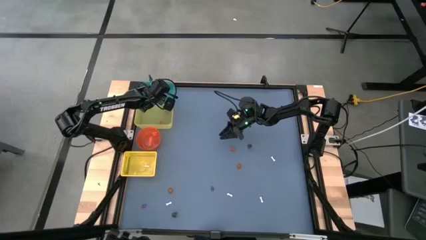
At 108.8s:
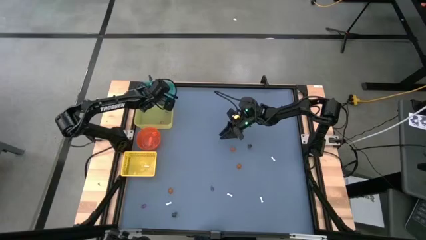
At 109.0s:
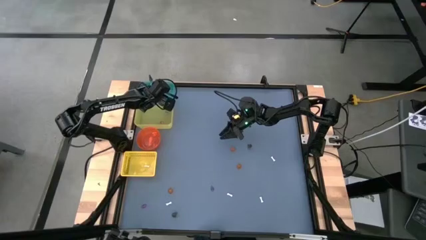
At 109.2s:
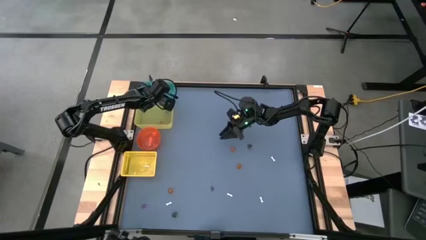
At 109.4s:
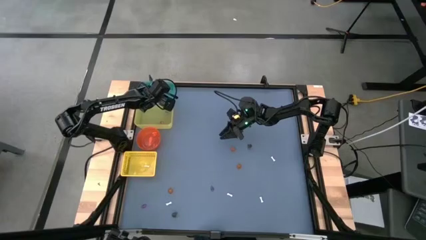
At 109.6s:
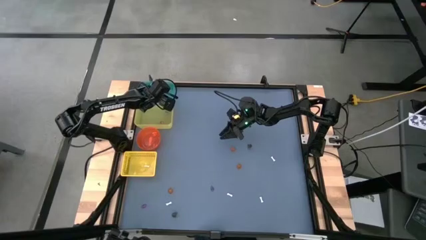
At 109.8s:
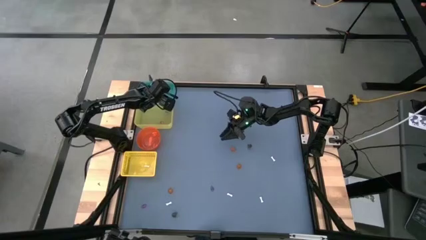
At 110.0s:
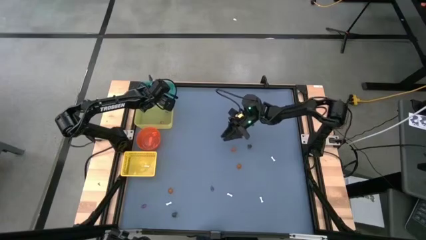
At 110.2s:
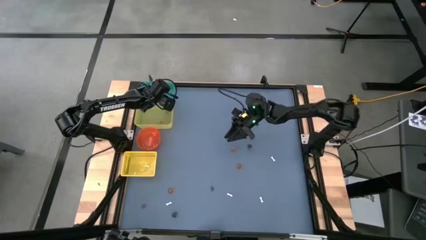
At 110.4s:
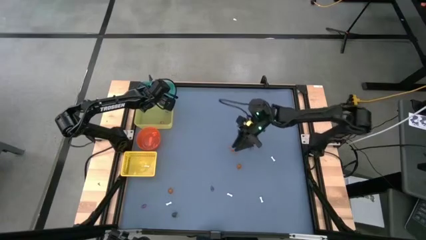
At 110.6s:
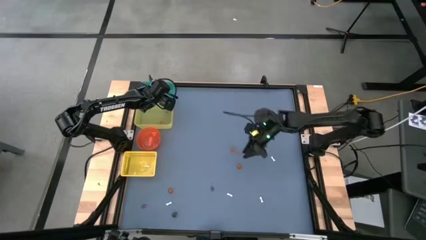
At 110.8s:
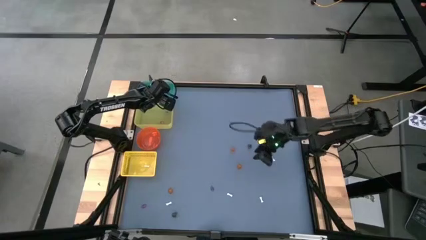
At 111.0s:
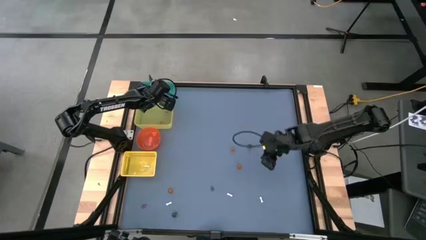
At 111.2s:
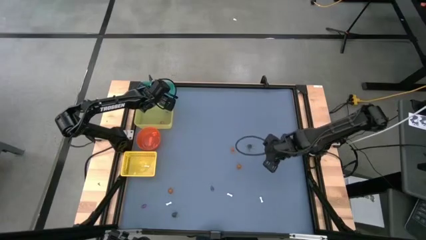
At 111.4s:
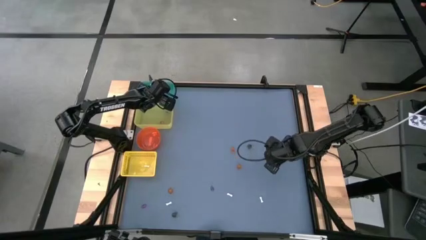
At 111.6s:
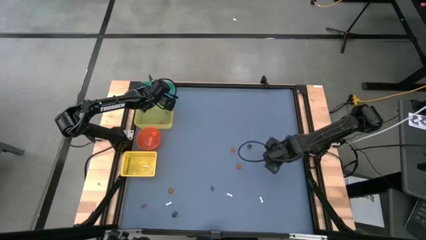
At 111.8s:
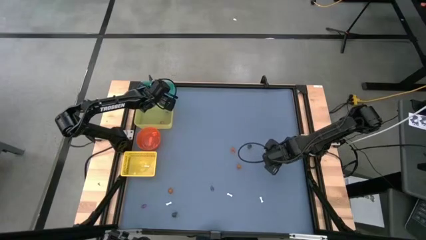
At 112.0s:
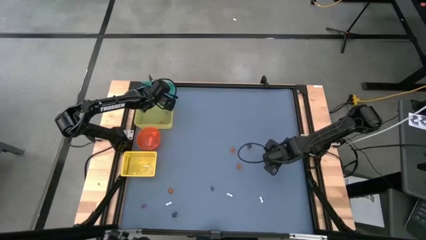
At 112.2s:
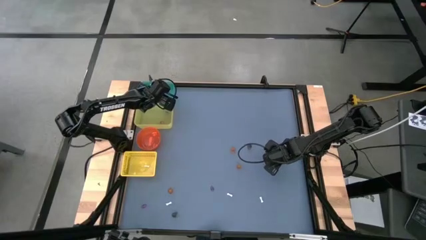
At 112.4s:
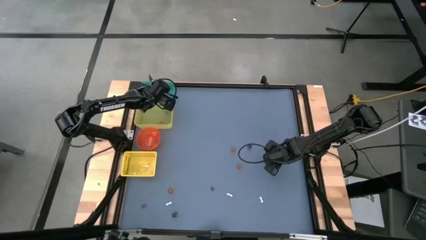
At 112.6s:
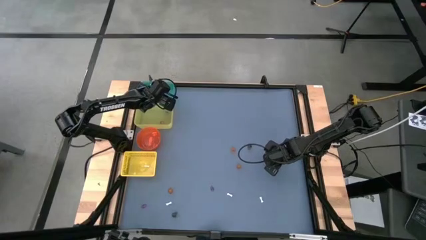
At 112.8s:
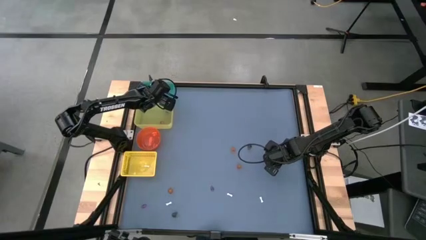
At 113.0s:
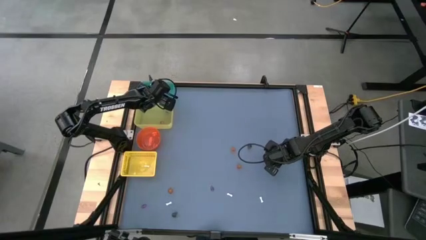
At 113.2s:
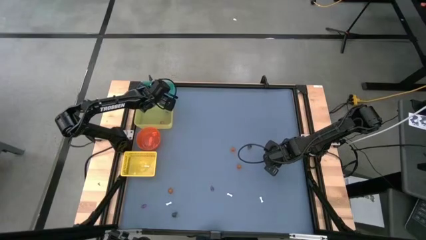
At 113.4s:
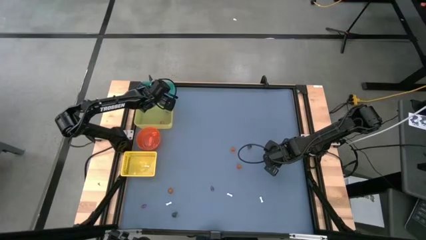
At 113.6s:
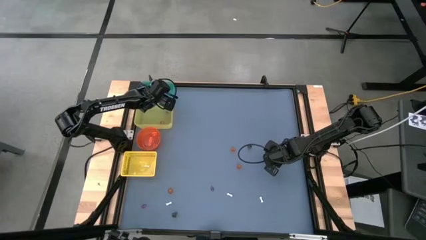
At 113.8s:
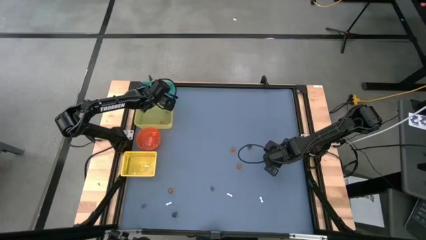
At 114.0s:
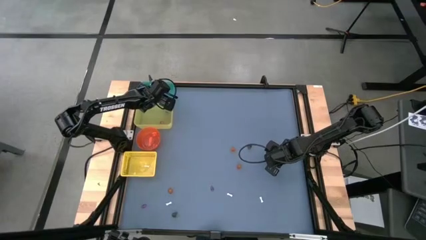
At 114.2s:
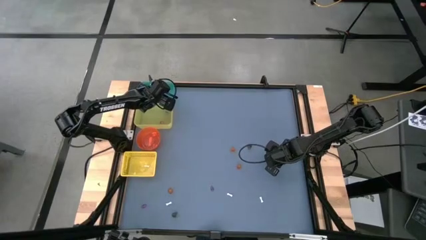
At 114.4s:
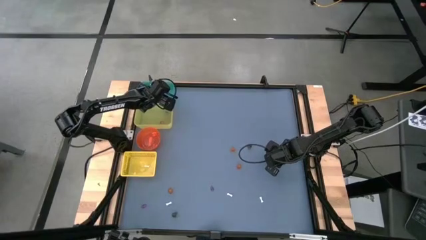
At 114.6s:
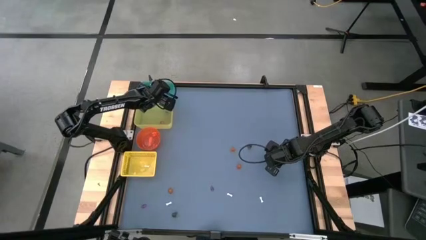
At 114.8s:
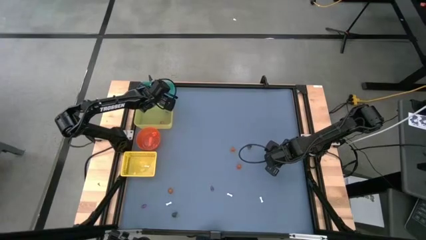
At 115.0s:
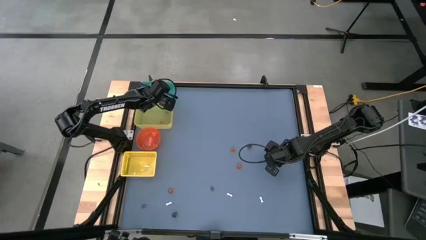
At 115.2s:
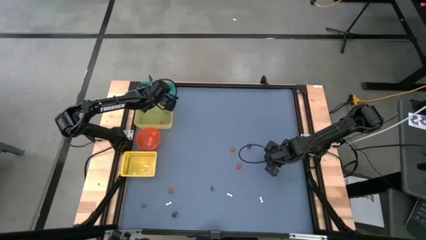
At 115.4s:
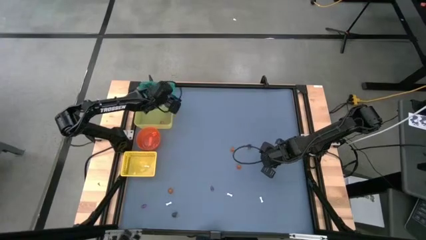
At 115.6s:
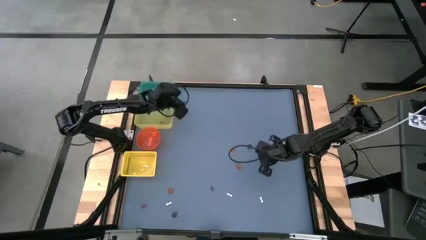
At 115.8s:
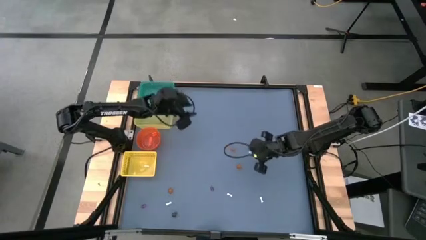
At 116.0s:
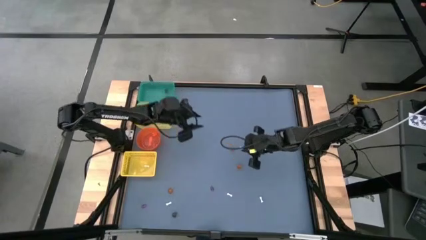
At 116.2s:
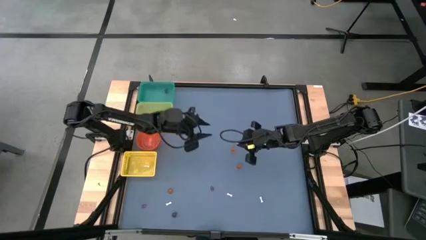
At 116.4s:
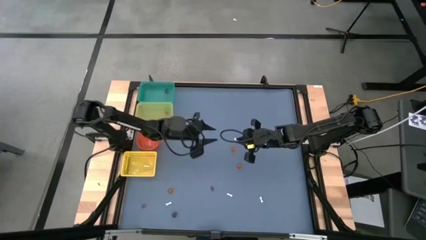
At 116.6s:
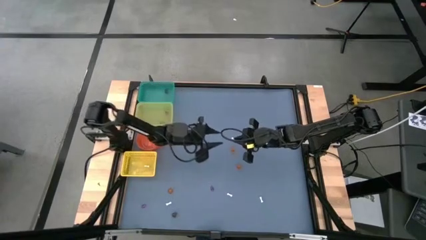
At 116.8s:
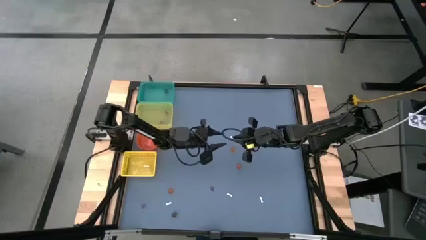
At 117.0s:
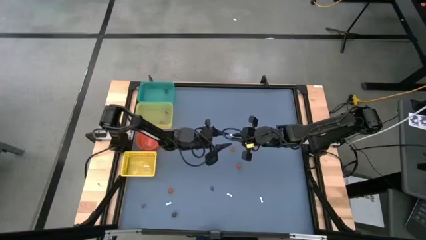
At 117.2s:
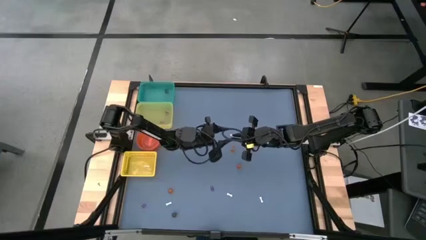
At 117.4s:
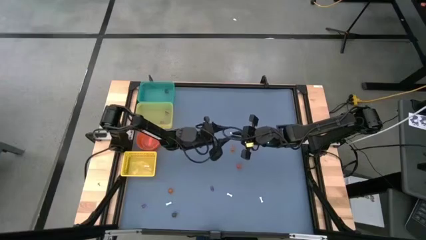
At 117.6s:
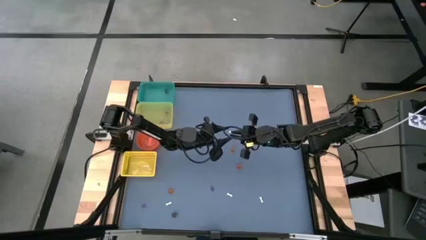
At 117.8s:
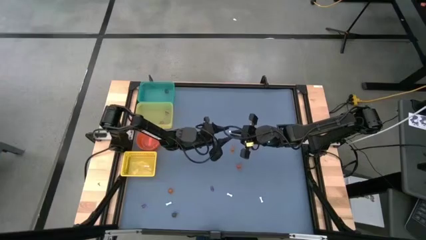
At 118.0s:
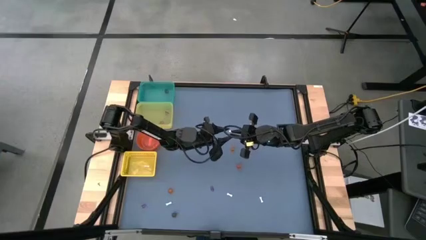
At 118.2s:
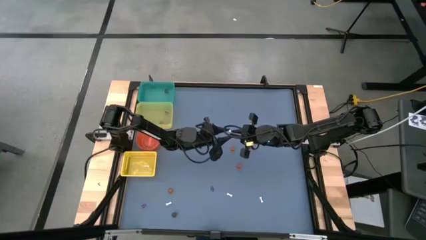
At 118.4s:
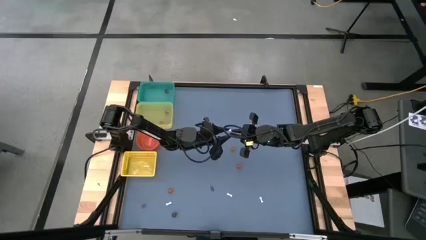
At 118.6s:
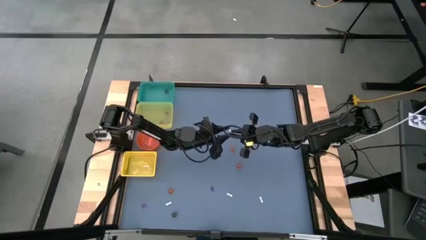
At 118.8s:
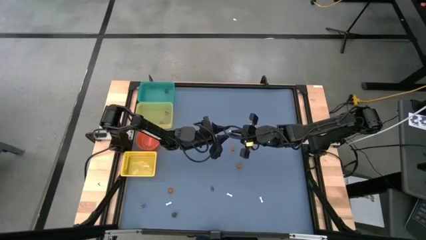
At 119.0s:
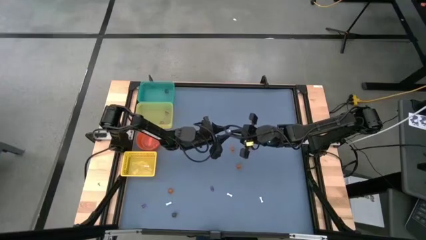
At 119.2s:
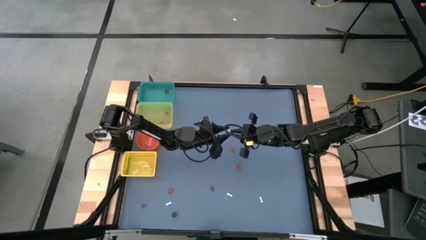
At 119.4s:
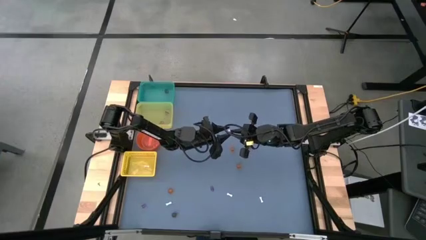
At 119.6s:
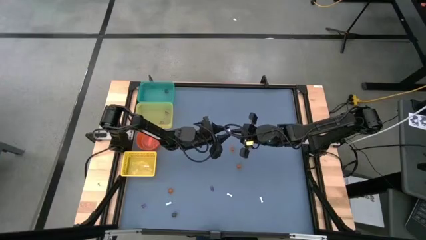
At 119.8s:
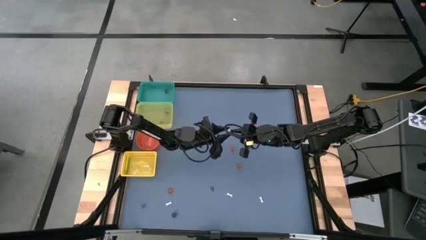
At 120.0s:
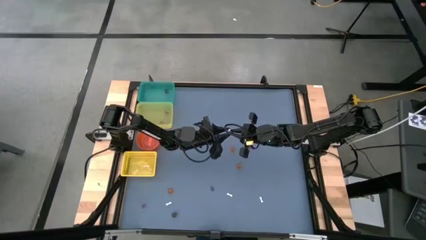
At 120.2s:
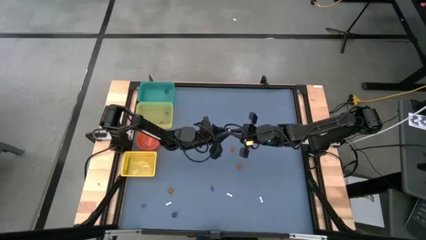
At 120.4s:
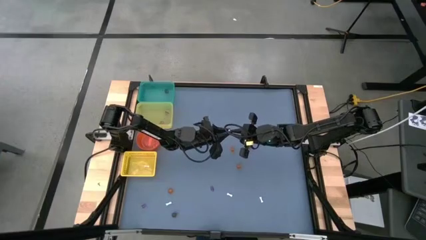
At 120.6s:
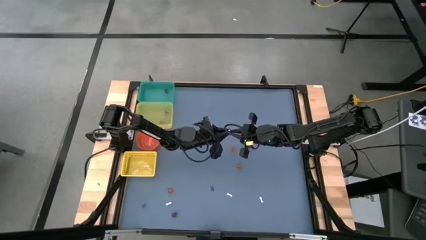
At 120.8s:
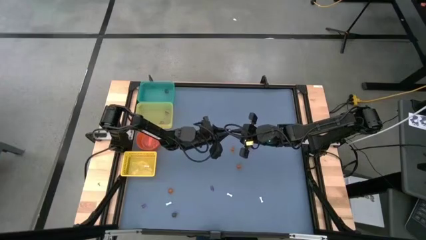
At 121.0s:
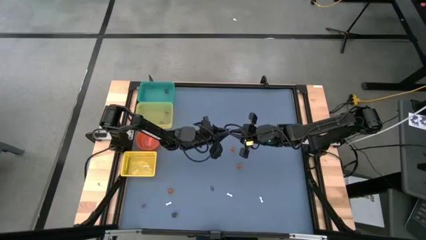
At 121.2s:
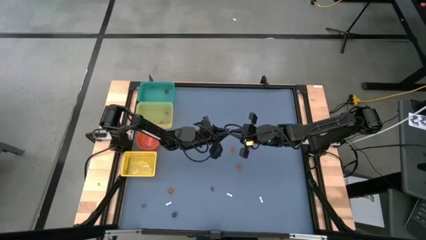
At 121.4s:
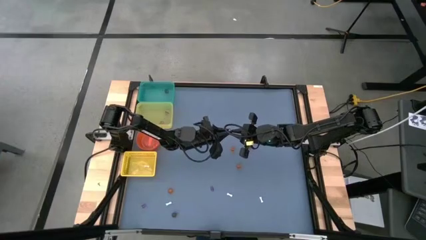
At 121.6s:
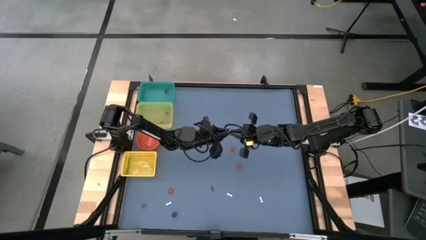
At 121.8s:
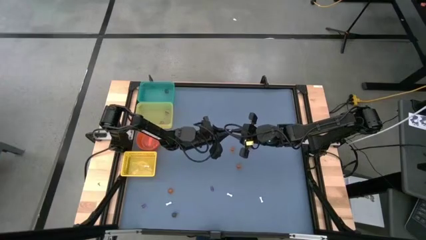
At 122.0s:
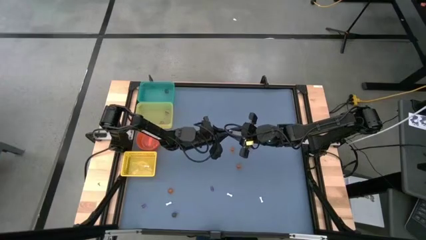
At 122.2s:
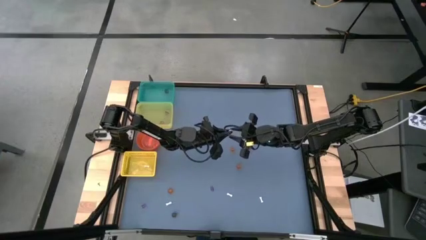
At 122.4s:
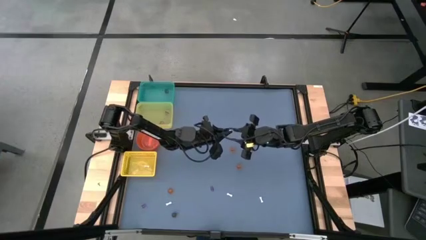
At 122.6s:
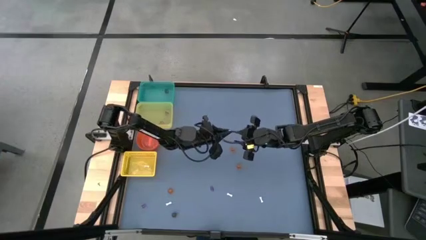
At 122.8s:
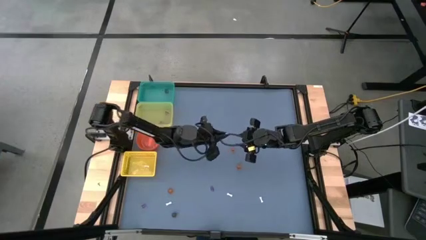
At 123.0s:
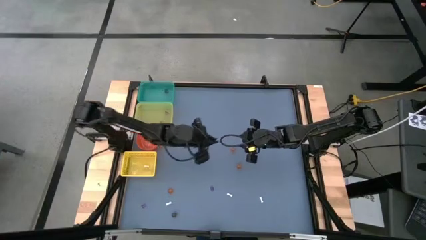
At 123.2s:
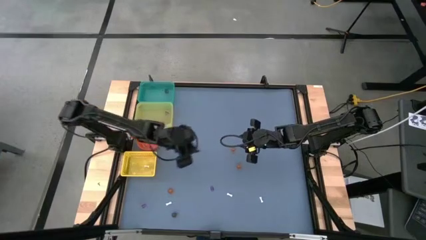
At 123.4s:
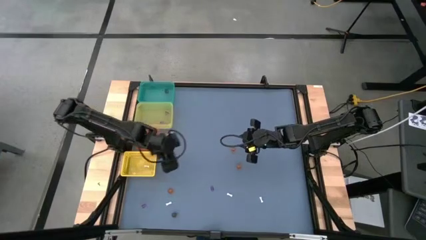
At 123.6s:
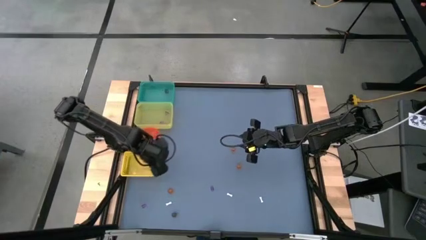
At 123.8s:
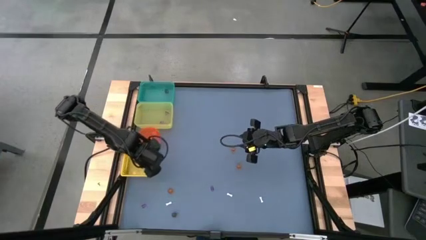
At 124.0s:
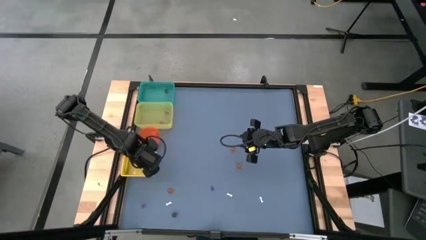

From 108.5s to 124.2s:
Task: Sort Halloween decoration
Put the top right white bone toy into the yellow basket

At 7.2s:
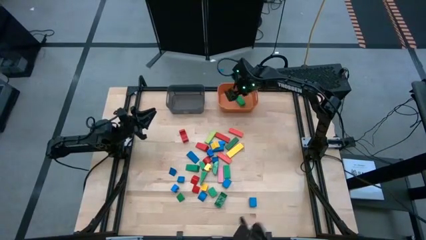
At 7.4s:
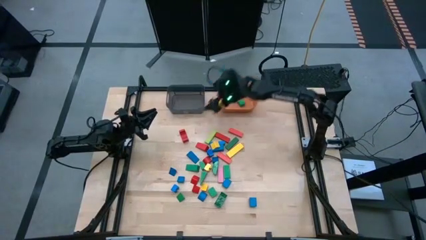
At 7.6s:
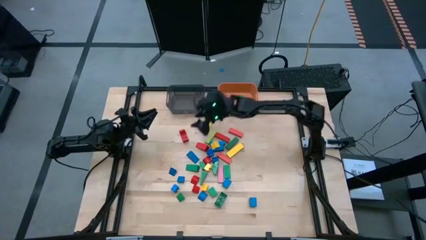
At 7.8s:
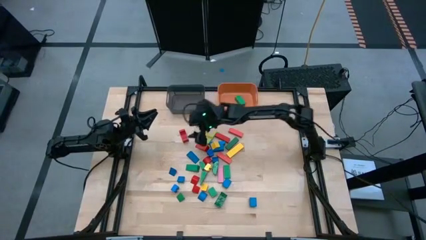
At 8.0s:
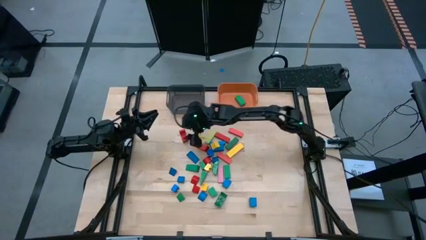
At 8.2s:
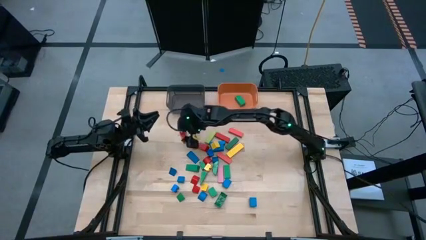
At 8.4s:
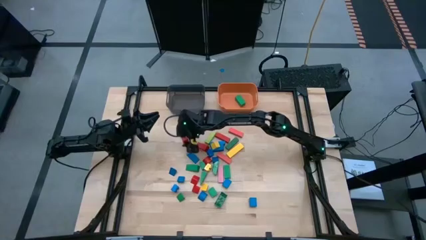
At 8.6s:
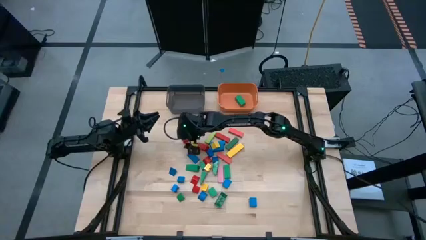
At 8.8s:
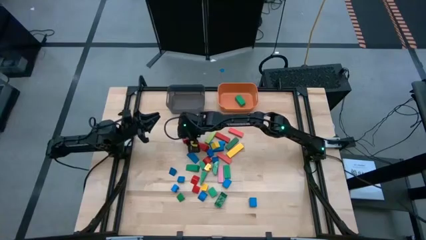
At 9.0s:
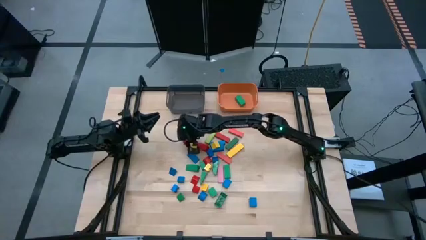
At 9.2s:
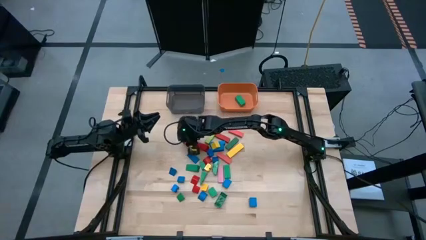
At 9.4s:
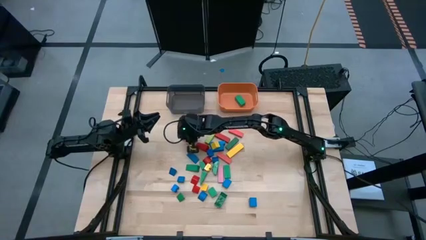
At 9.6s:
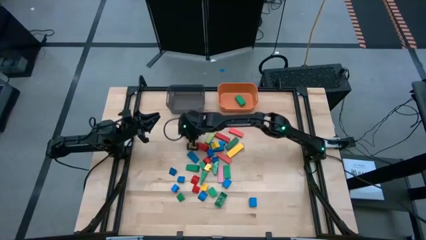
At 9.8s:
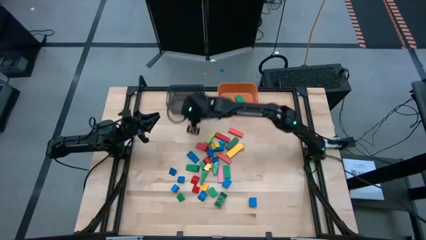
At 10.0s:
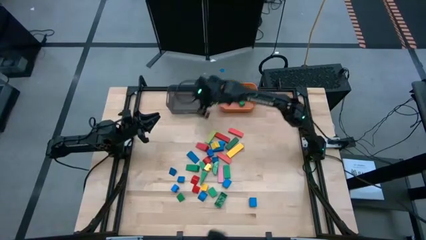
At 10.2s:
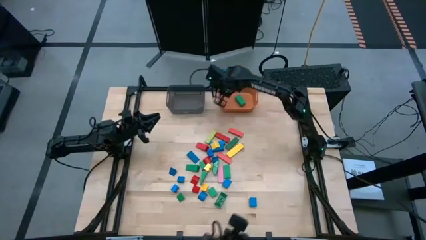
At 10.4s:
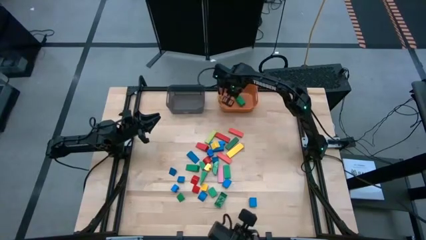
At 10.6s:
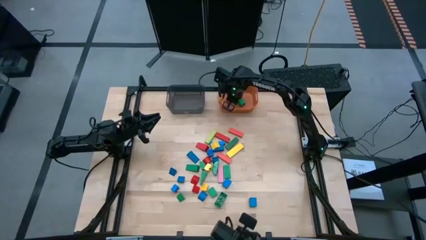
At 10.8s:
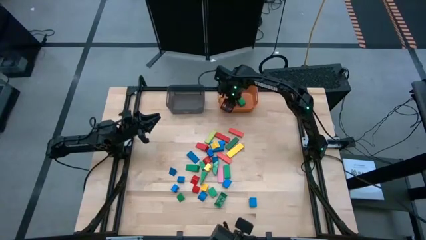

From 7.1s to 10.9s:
Task: Sort blocks by size
Put the large red block into the orange bin
